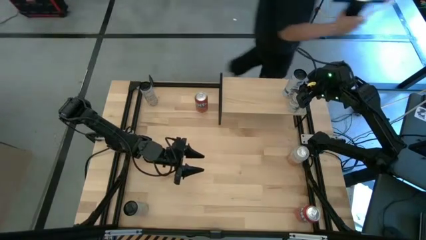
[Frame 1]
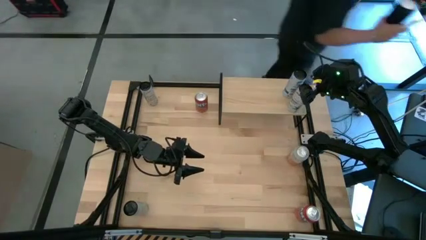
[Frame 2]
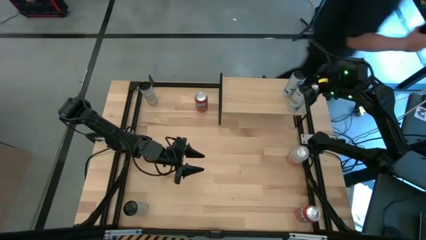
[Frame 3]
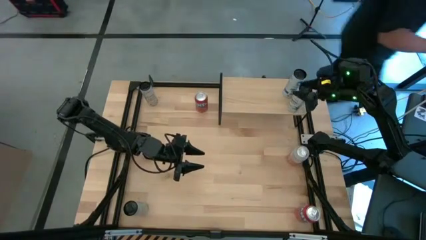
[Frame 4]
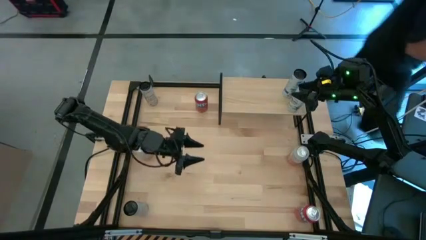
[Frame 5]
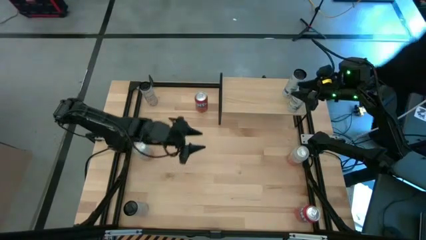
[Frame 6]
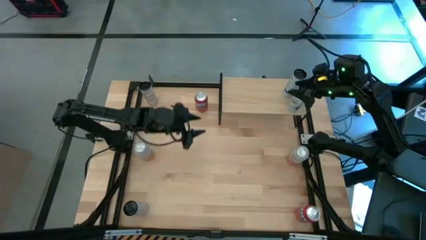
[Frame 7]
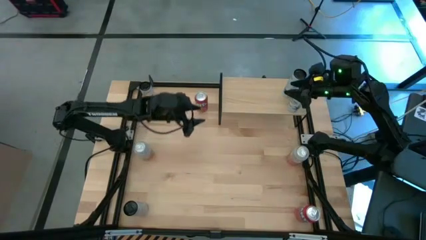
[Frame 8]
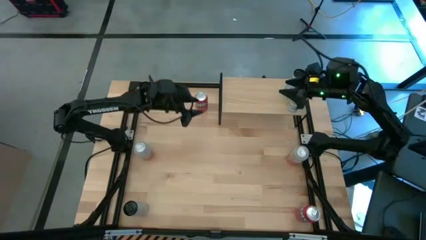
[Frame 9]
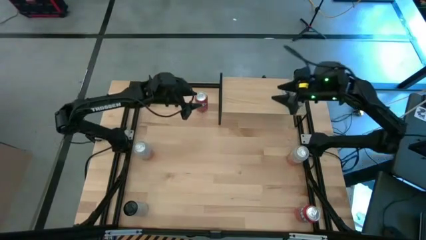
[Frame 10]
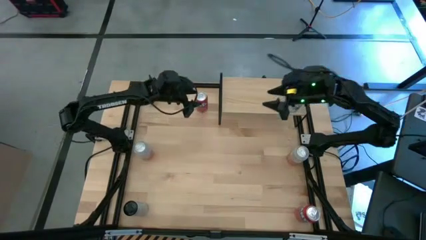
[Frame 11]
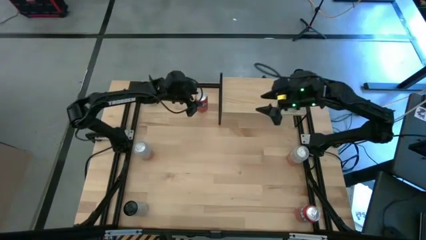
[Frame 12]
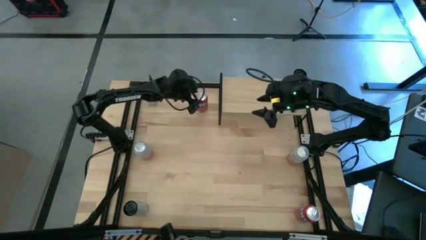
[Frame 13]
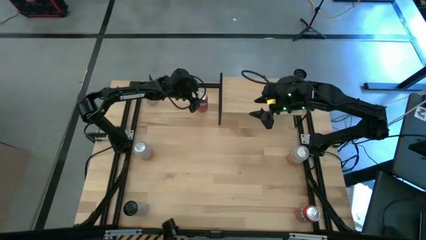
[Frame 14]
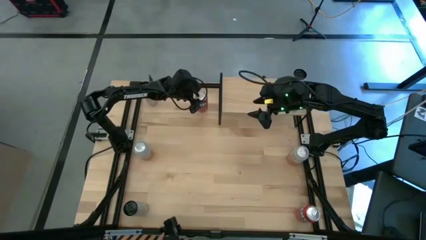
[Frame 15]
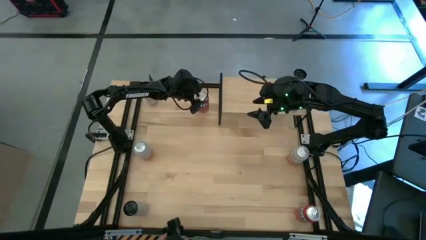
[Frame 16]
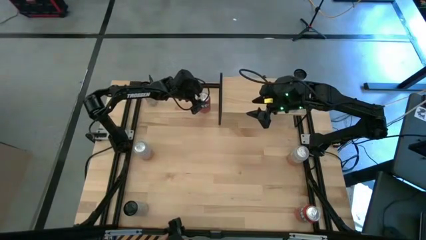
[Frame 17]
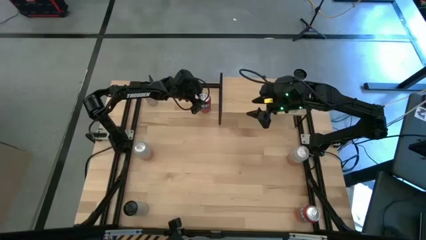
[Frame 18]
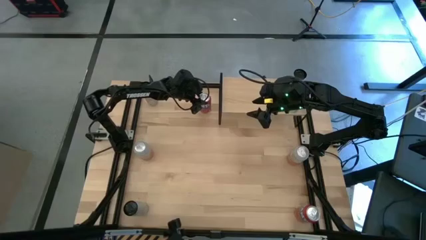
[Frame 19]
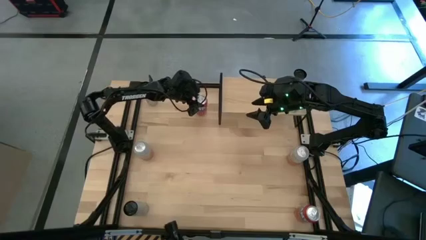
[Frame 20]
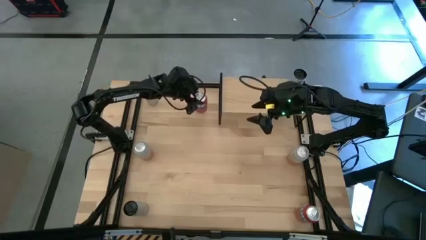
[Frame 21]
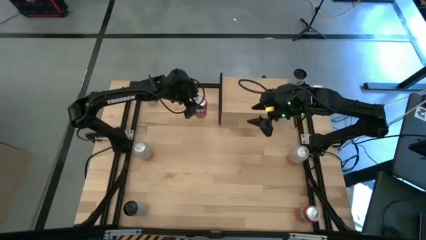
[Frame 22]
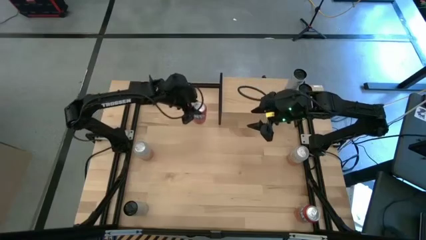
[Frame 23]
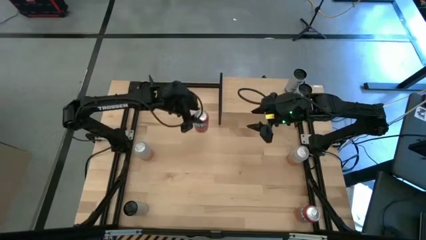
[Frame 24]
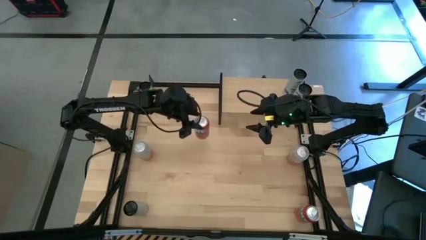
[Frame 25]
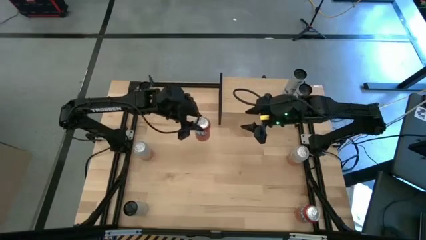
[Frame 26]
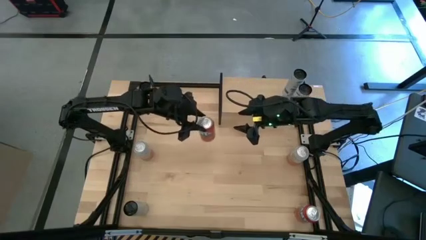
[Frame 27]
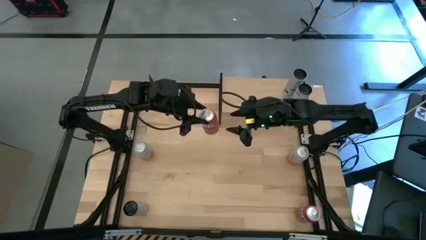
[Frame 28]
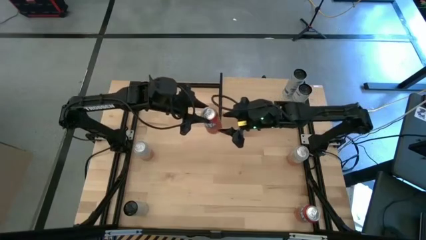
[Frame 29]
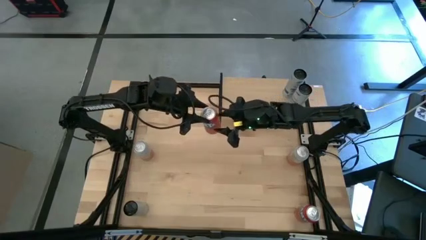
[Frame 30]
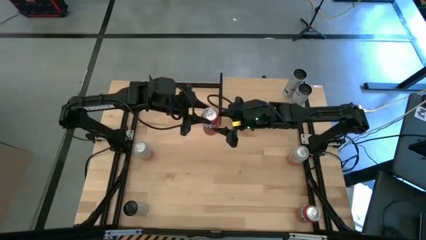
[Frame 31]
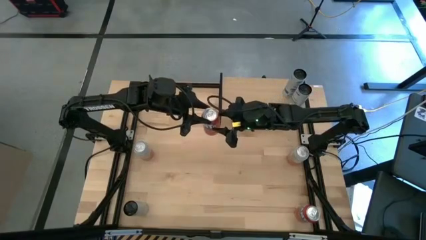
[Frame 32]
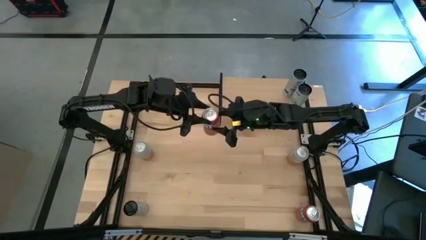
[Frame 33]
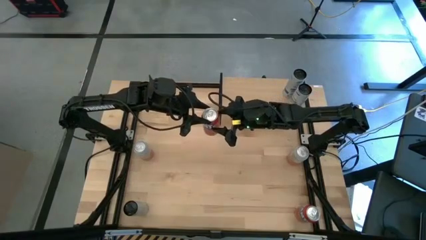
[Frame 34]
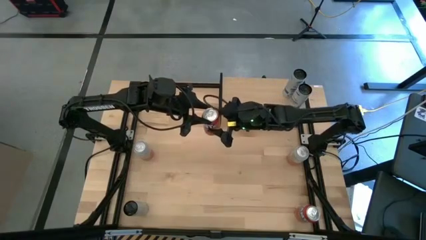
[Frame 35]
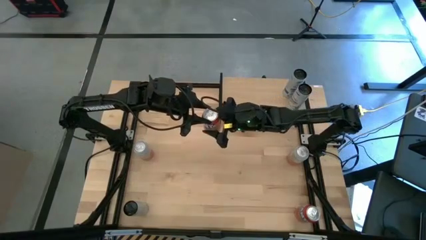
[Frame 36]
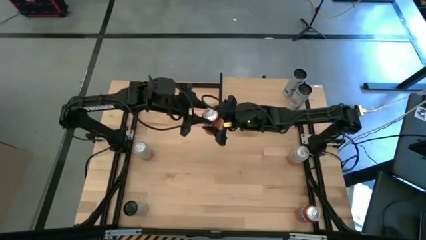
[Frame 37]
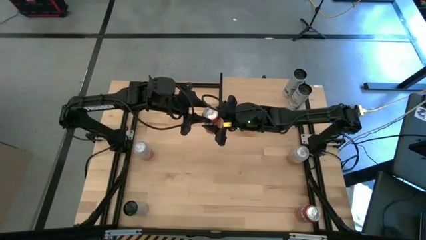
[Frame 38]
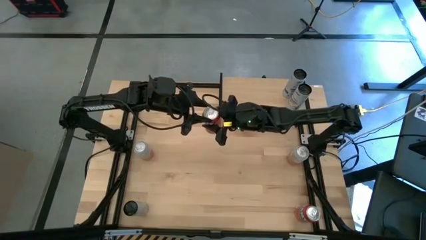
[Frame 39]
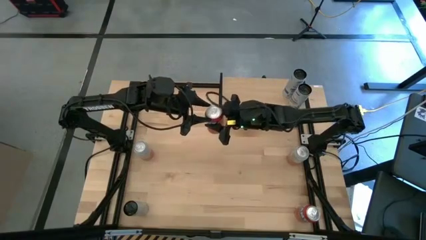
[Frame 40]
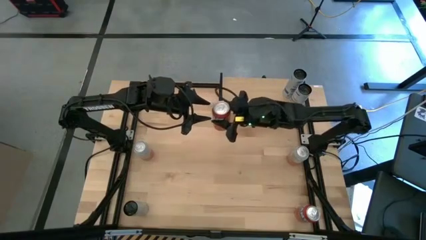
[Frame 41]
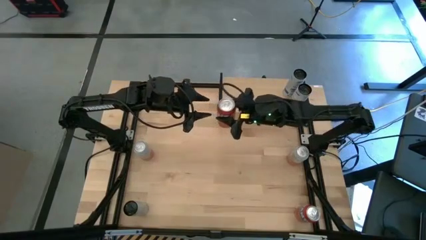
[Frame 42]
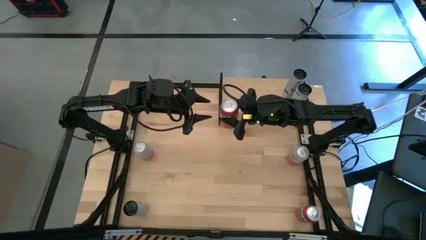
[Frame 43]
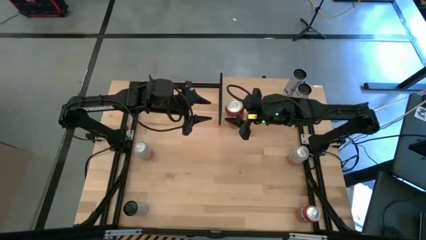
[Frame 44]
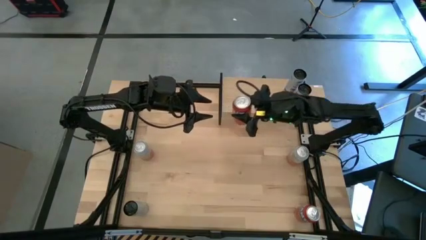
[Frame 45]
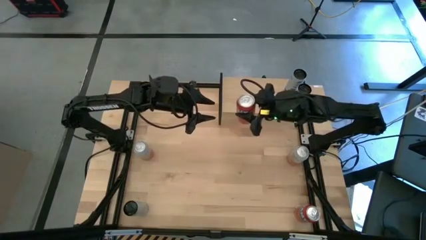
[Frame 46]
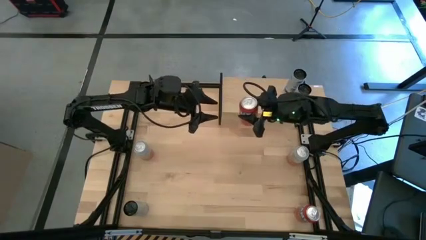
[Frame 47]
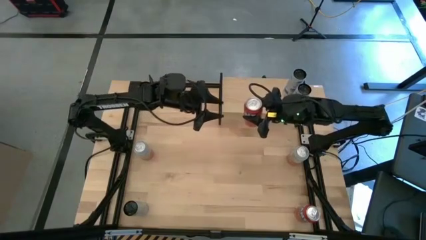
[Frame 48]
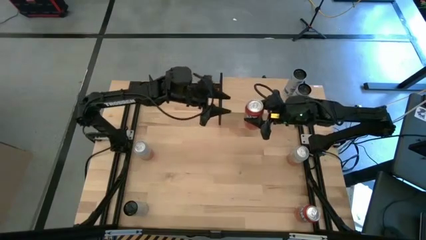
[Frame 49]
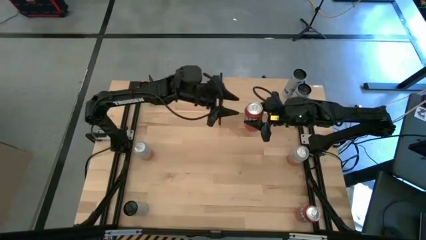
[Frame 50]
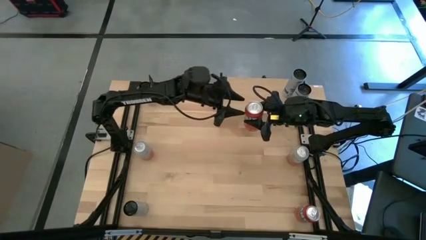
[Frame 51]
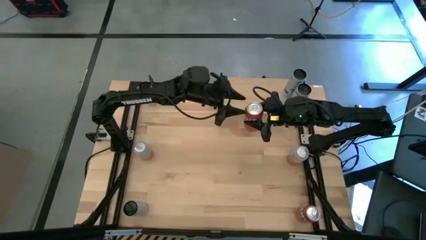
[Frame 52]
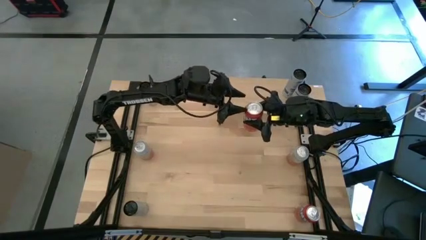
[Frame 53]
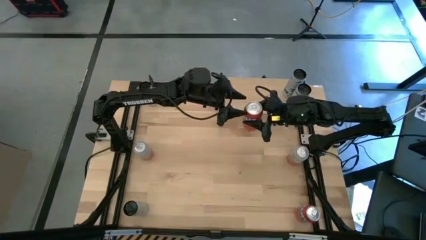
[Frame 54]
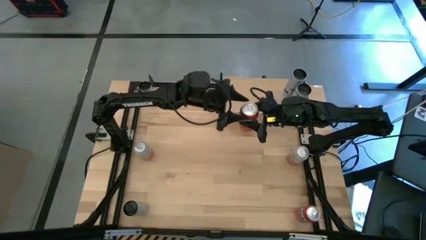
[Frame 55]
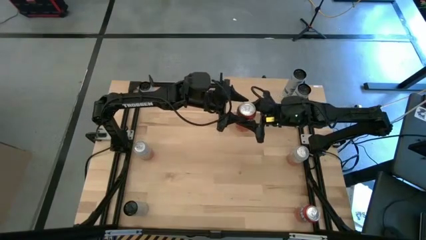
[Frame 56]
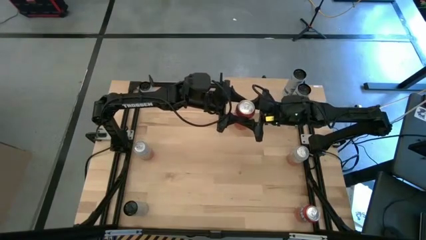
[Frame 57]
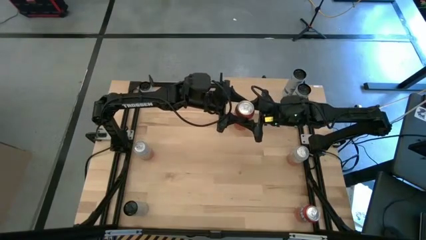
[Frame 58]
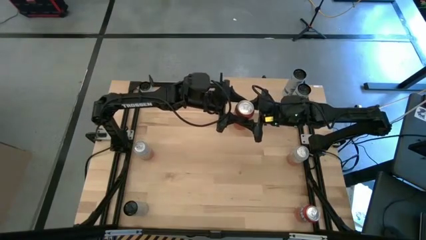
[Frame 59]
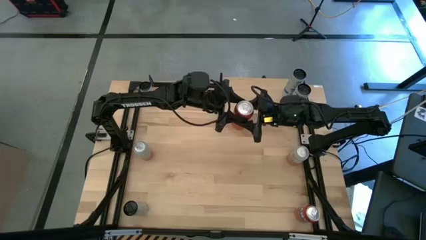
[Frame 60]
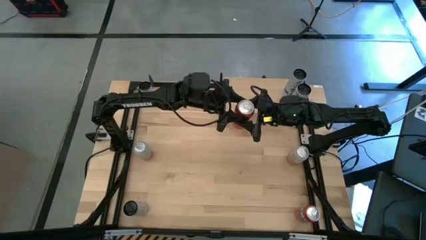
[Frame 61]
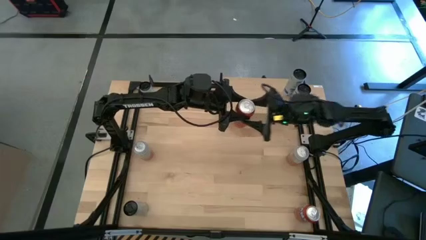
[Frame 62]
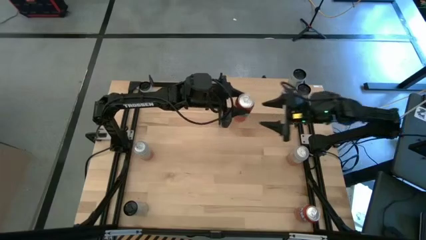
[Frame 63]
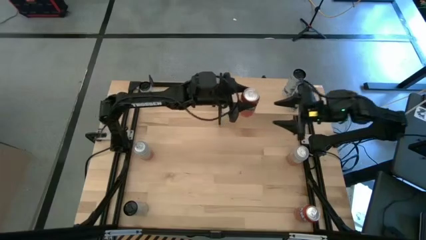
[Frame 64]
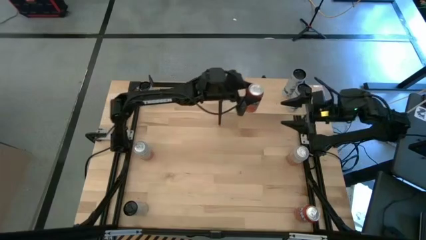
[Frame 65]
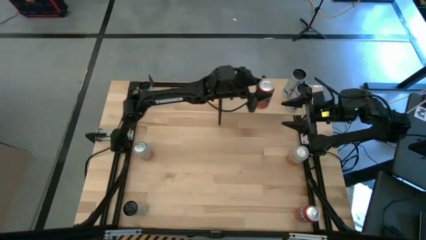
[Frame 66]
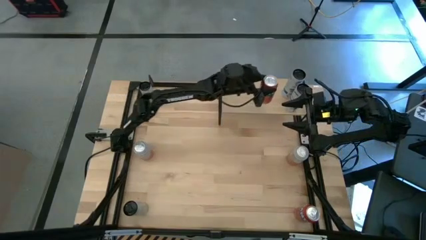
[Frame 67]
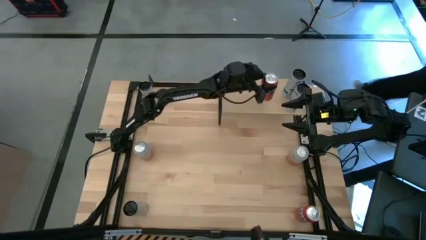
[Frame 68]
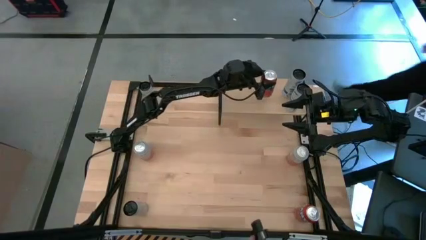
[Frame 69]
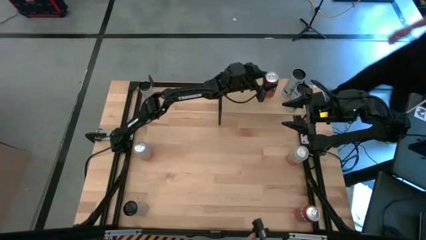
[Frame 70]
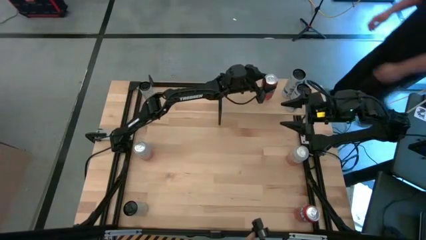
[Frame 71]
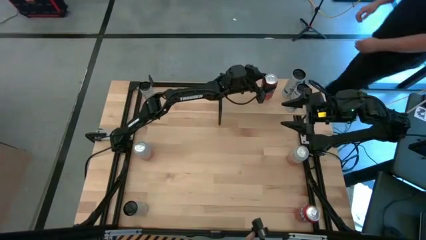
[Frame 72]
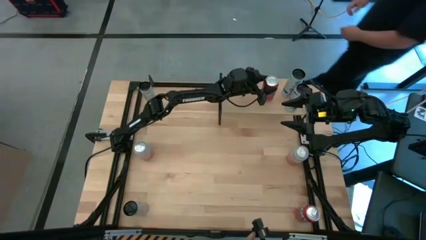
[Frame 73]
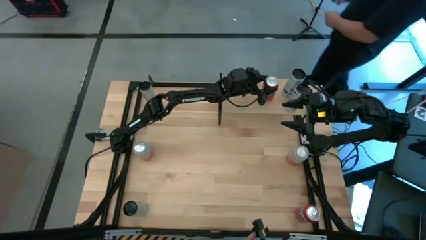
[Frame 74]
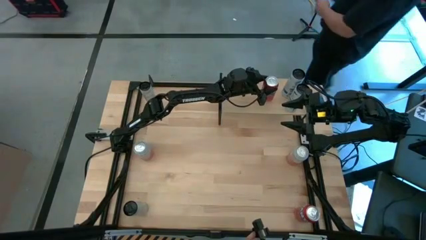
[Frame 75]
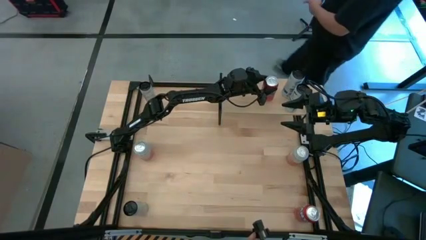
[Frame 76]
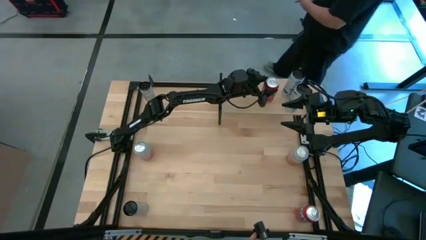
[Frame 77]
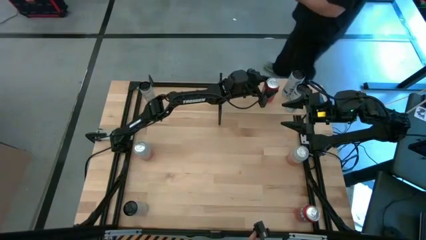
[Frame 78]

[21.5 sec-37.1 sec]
Task: Place canned beverage on shelf
Put the top orange soda can on the shelf
